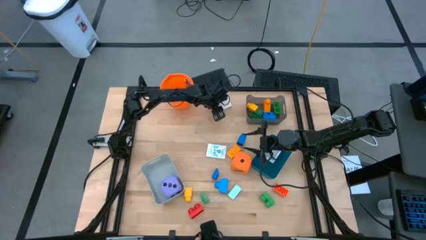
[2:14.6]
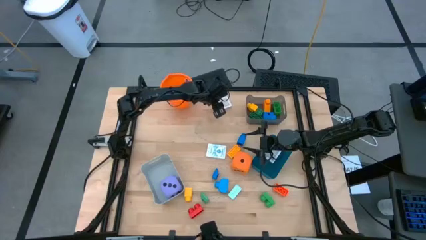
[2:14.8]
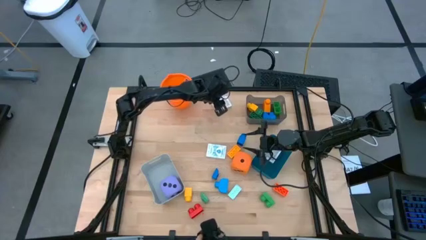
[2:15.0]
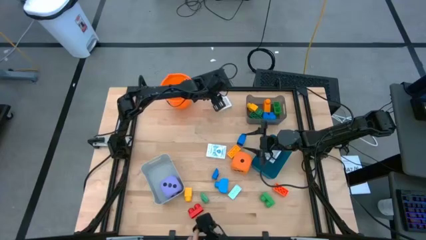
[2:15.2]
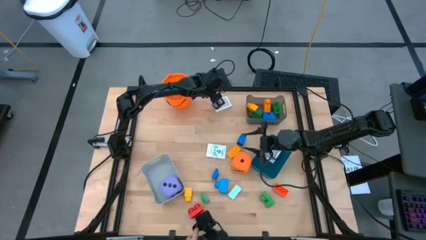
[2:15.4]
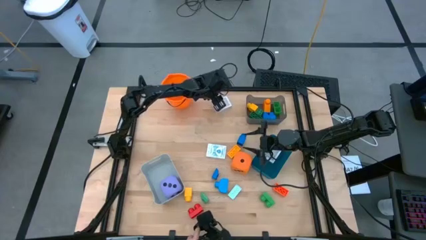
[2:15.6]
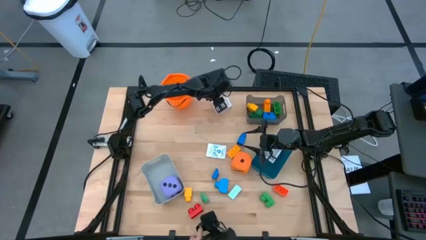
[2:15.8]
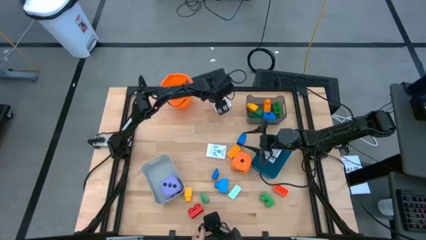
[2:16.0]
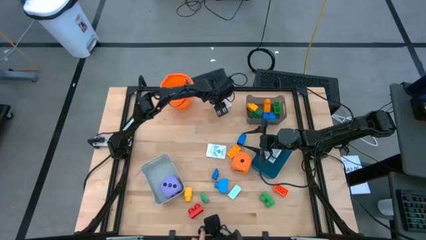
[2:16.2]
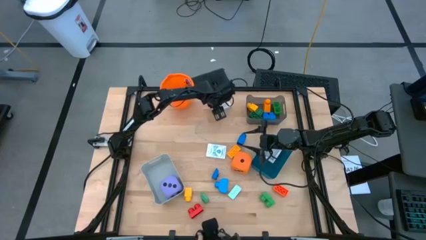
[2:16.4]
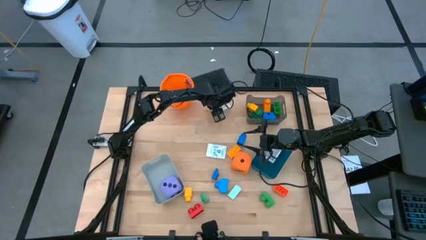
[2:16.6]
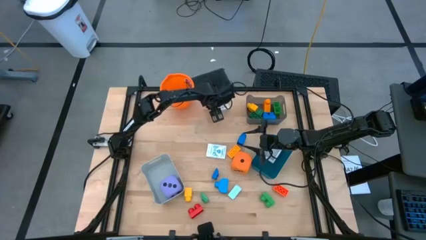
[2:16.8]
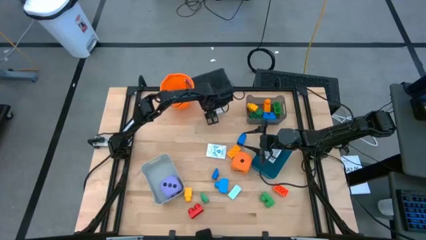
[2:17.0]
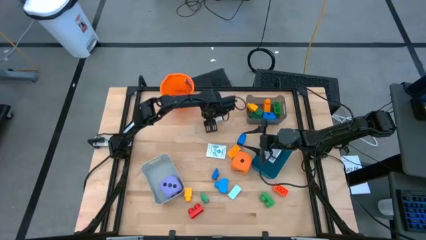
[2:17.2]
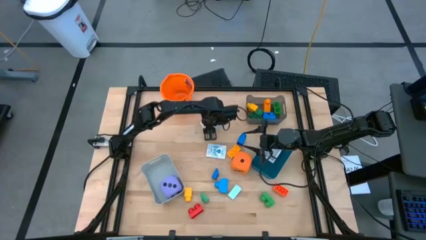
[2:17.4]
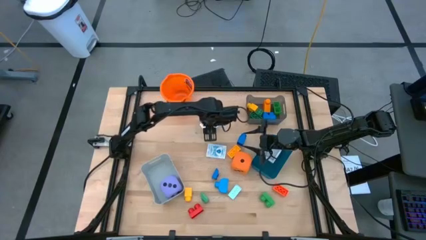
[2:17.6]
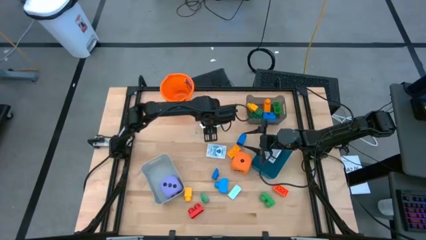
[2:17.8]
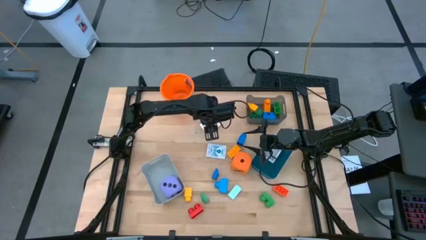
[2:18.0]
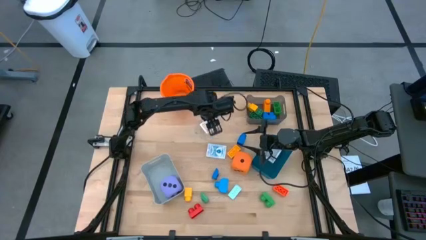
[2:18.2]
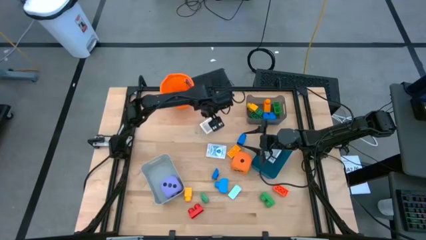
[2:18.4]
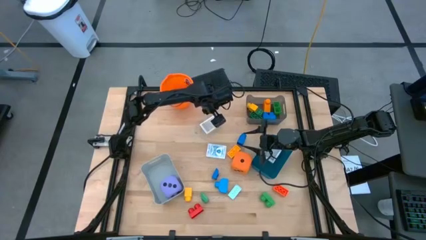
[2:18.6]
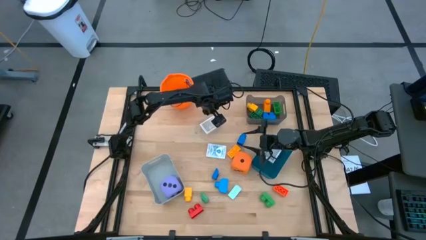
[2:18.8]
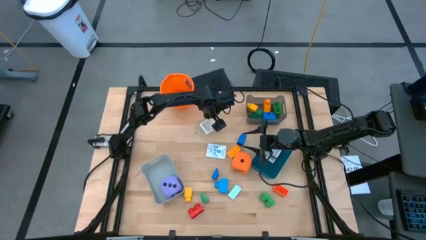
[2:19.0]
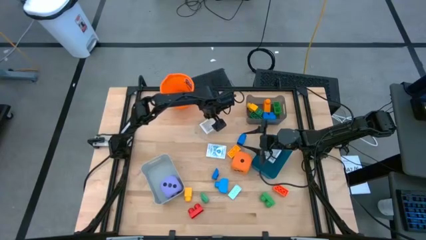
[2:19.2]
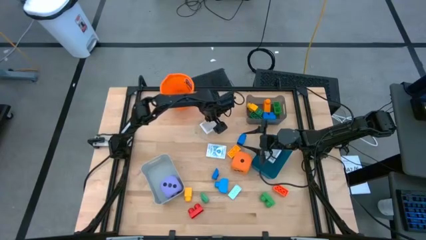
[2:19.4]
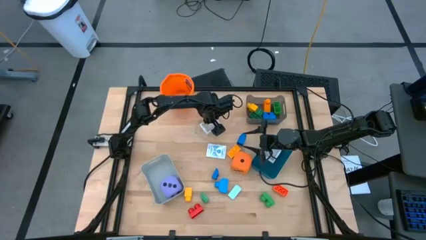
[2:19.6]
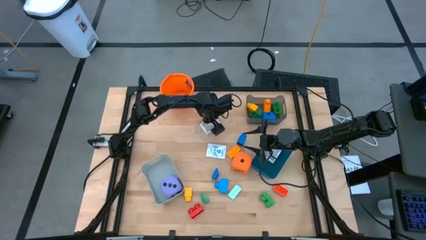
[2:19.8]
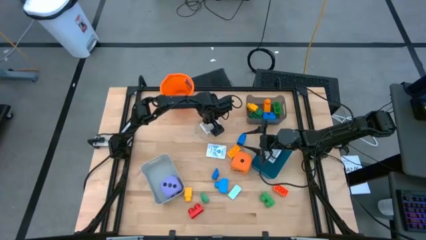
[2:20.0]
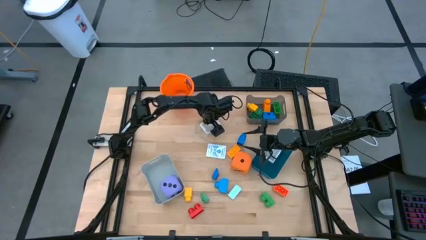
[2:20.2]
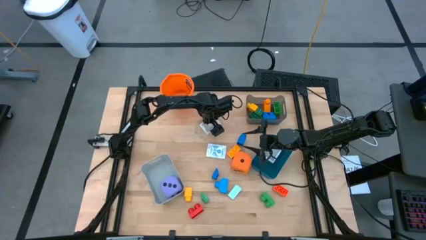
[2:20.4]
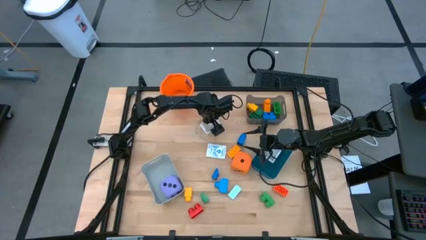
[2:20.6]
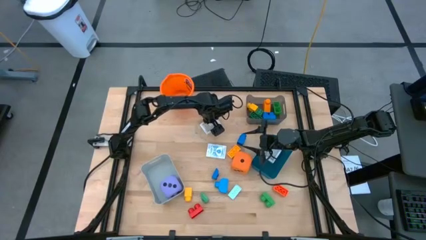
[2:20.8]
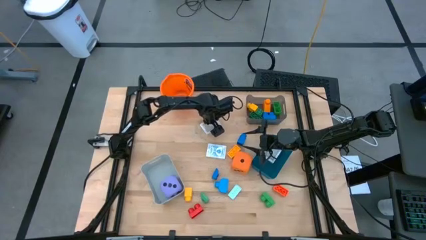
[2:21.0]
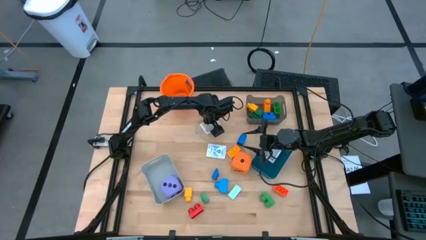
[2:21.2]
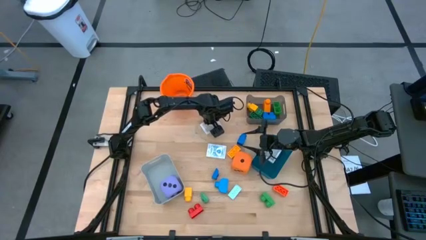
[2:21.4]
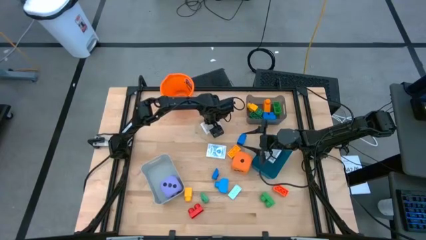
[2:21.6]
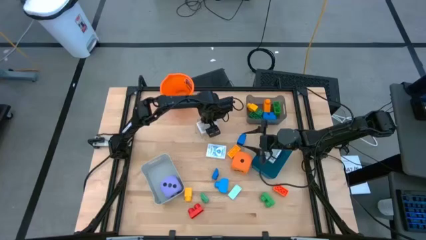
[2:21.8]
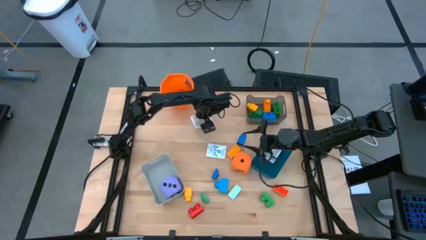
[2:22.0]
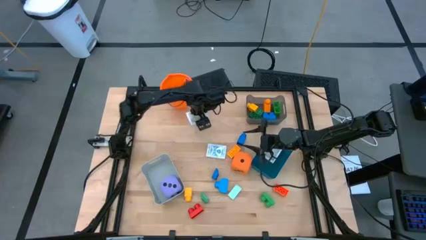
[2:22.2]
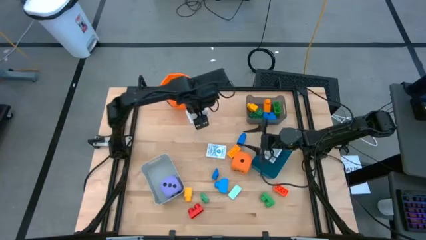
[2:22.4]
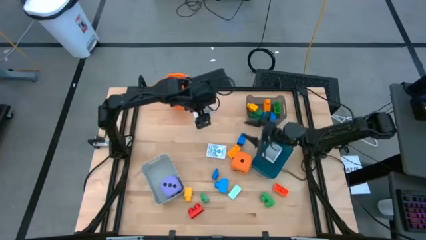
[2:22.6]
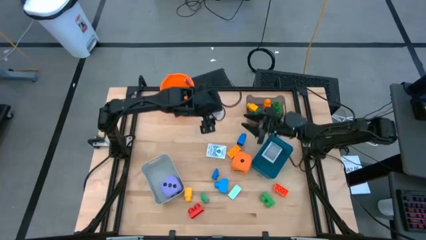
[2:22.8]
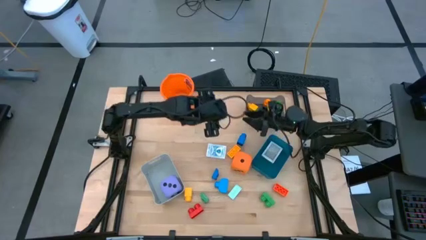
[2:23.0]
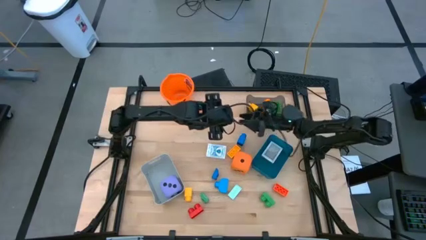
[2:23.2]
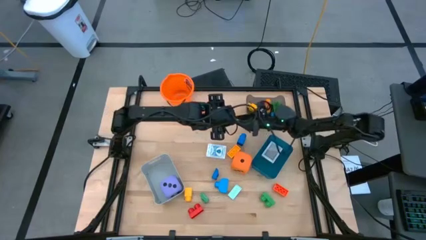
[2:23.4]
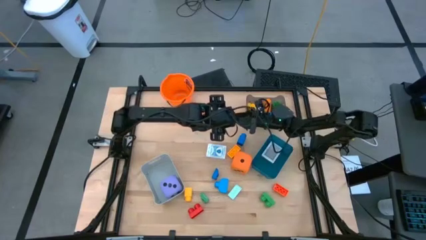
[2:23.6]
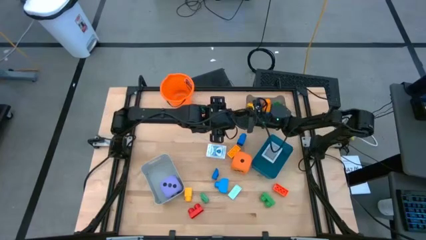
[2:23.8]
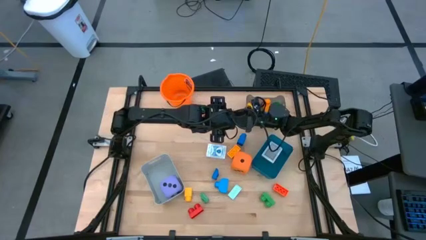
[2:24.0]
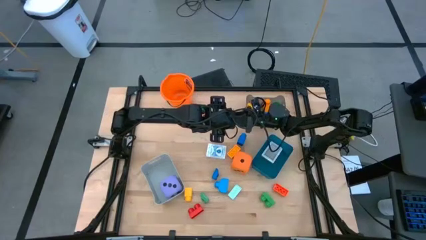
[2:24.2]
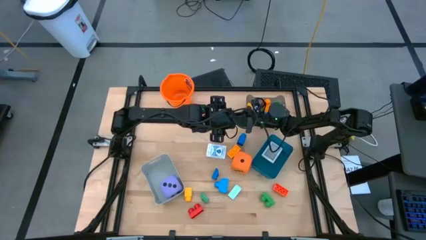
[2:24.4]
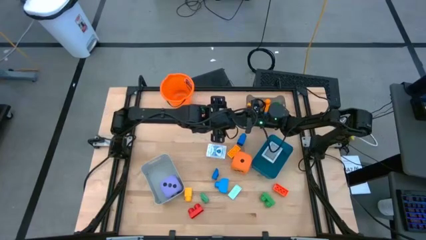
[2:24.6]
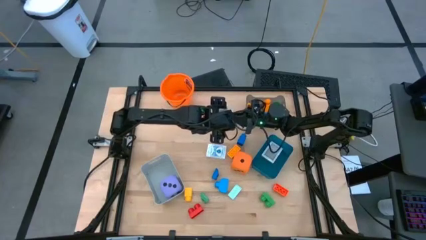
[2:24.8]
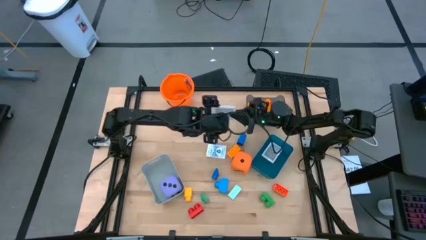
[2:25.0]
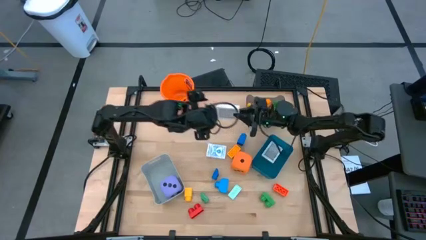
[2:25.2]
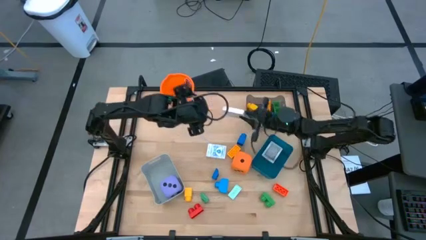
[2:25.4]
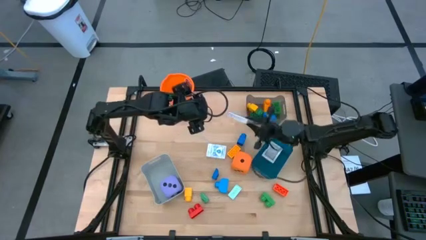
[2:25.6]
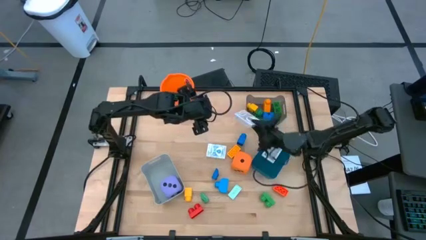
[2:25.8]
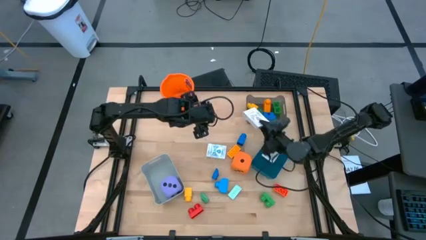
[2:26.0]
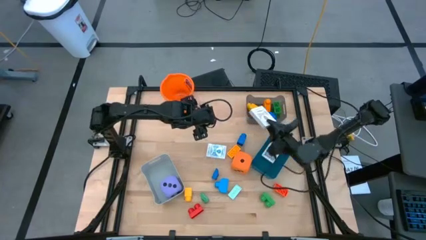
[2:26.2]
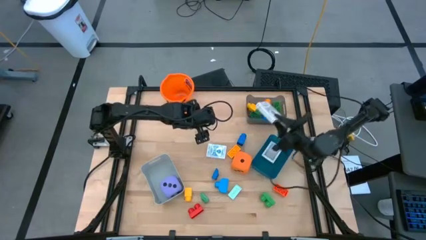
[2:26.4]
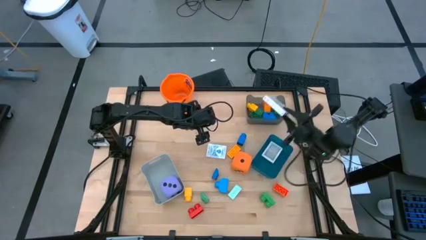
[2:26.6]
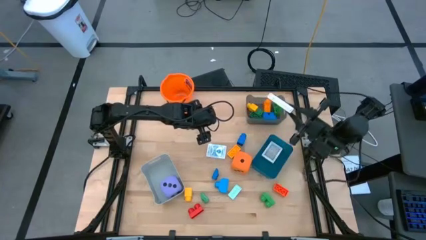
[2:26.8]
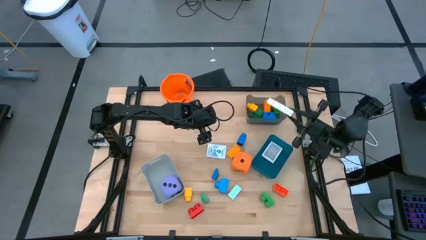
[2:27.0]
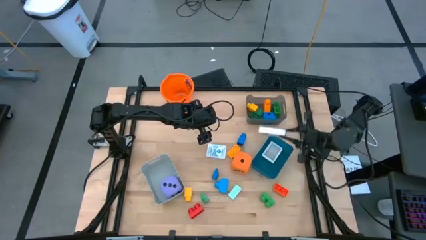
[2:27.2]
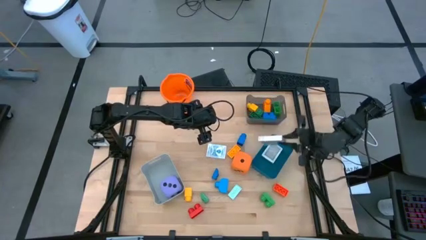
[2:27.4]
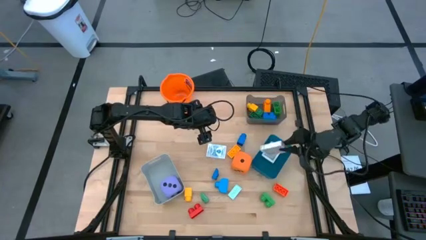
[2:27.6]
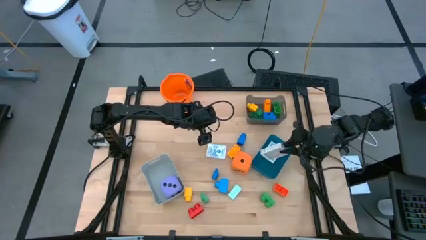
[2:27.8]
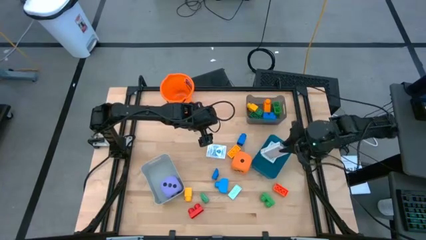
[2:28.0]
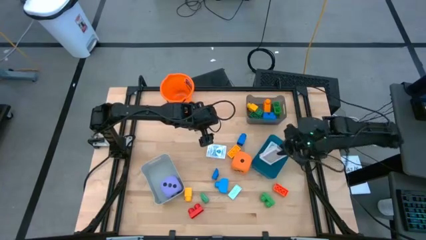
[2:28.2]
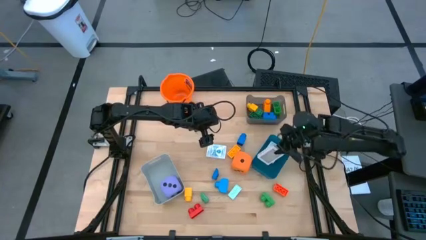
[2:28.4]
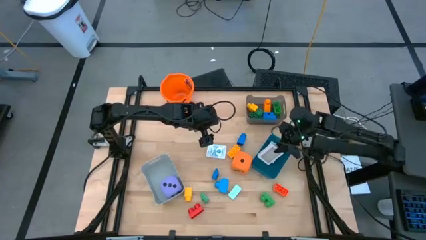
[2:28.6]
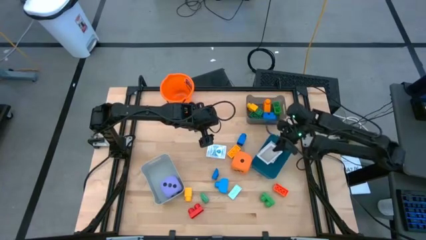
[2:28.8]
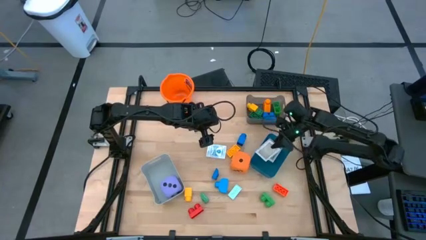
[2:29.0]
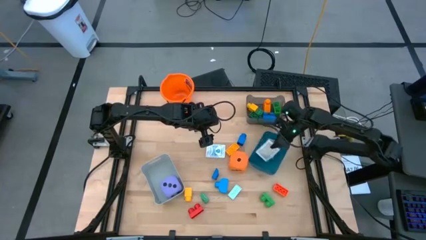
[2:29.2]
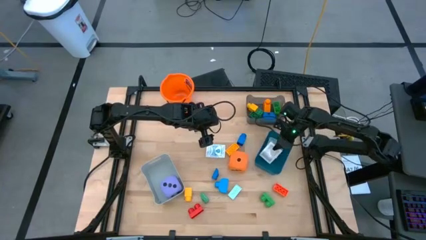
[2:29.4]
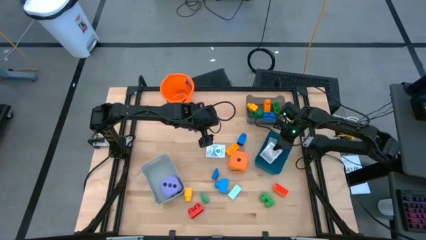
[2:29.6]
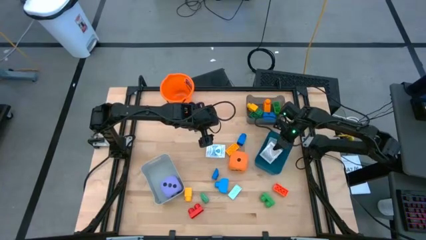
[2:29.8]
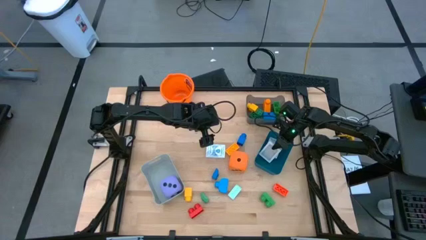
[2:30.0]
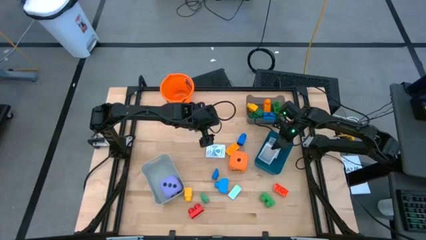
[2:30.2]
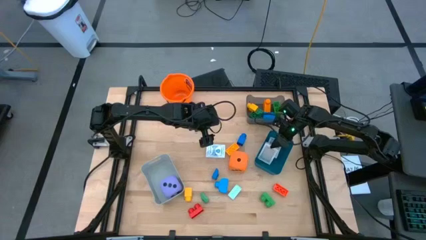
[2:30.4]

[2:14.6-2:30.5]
Task: Pick & Place Toys
Put the brown deck of cards into the blue bin
